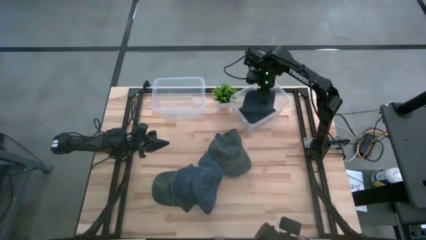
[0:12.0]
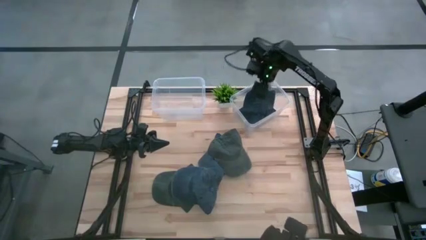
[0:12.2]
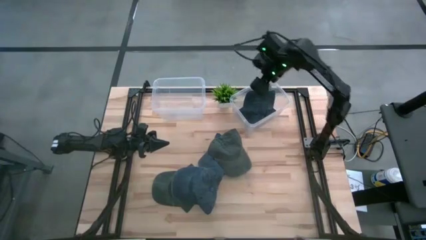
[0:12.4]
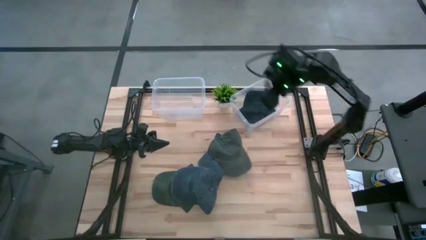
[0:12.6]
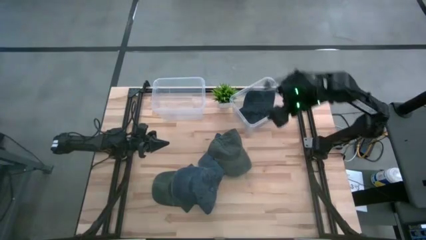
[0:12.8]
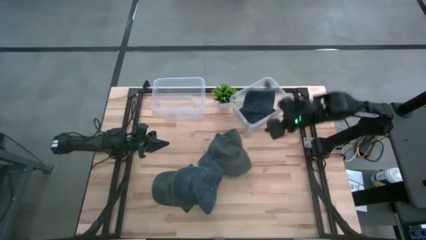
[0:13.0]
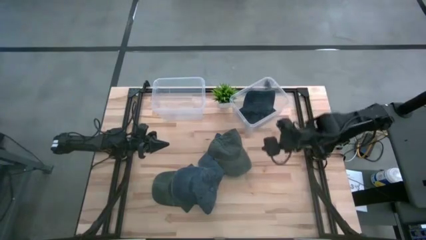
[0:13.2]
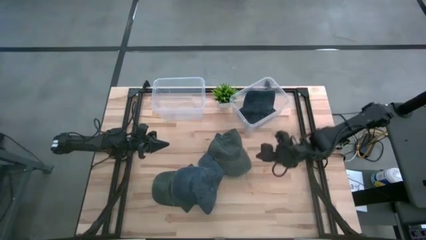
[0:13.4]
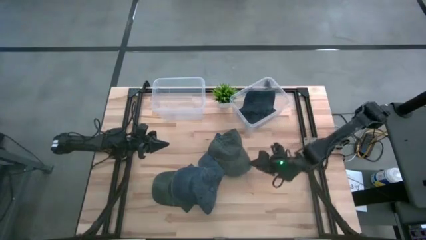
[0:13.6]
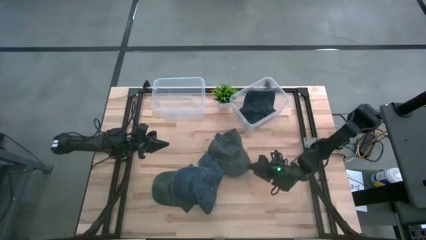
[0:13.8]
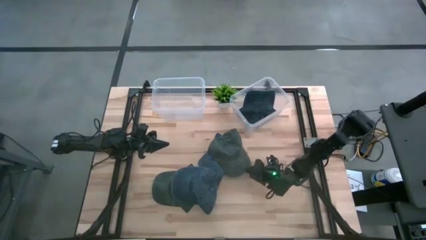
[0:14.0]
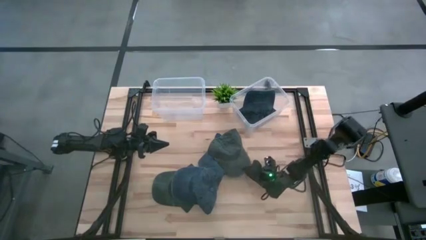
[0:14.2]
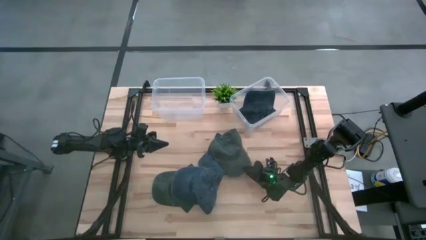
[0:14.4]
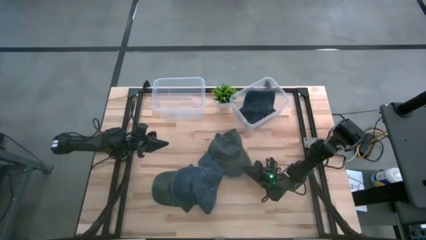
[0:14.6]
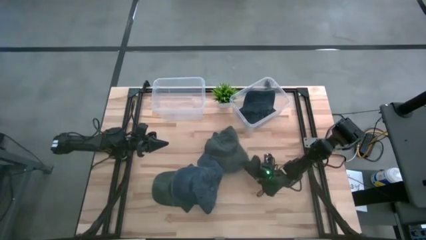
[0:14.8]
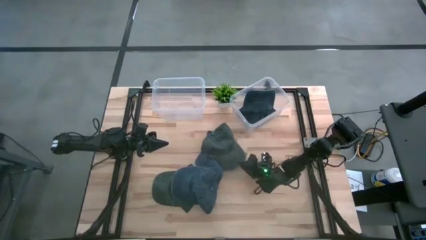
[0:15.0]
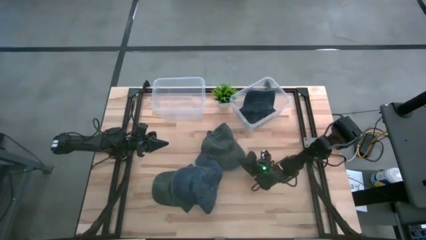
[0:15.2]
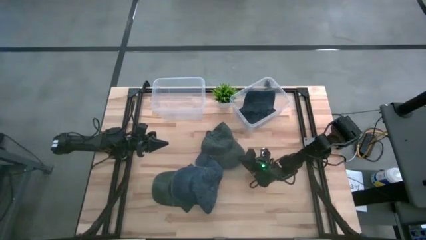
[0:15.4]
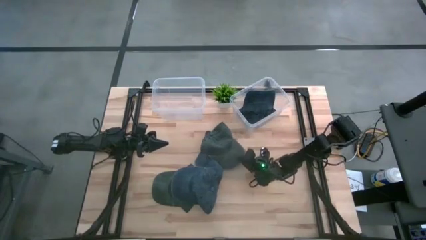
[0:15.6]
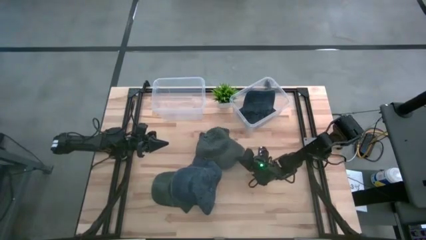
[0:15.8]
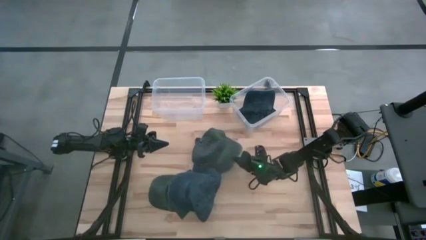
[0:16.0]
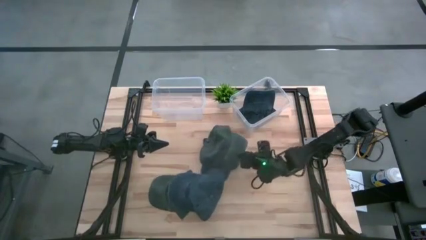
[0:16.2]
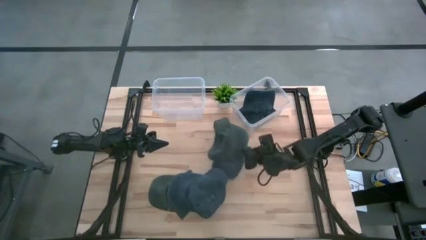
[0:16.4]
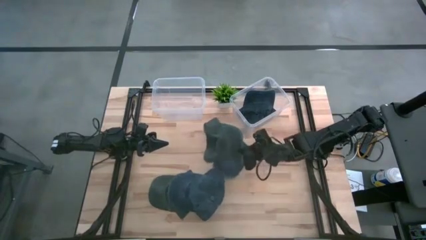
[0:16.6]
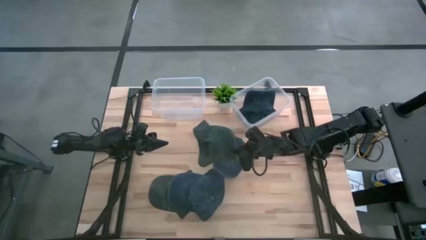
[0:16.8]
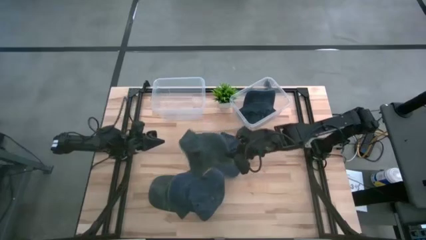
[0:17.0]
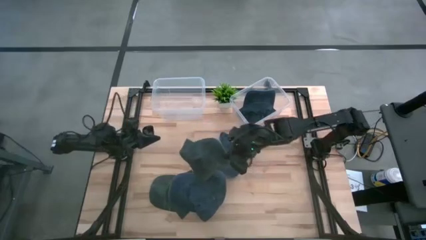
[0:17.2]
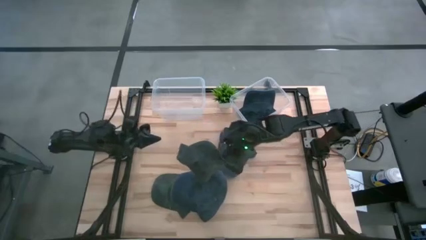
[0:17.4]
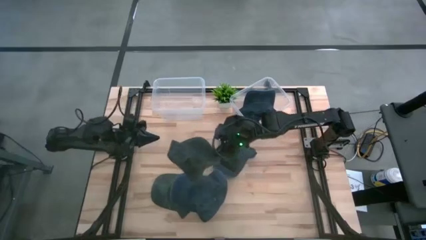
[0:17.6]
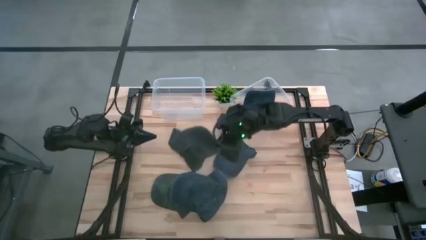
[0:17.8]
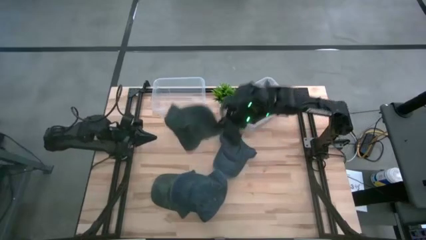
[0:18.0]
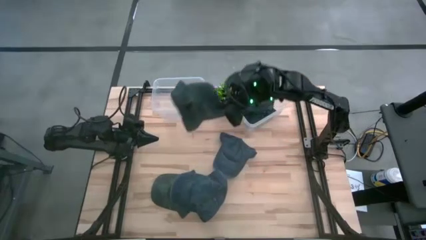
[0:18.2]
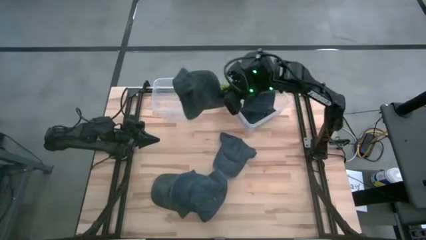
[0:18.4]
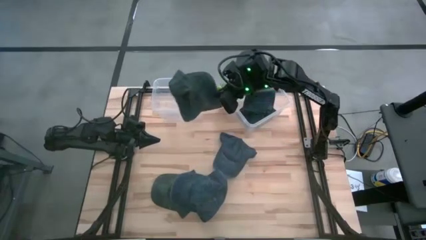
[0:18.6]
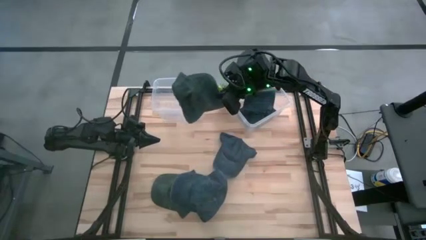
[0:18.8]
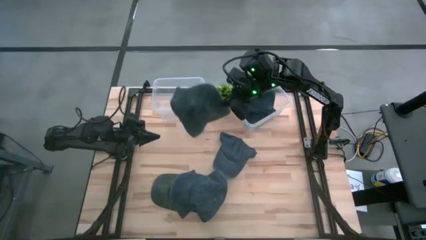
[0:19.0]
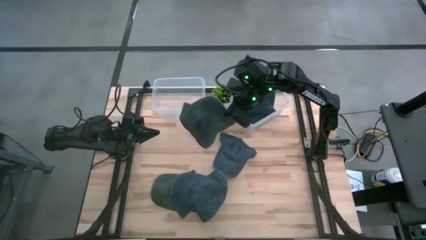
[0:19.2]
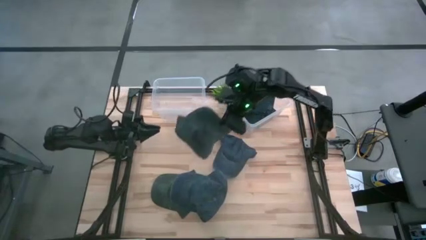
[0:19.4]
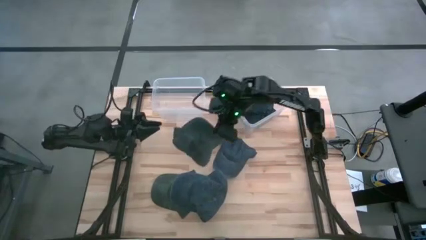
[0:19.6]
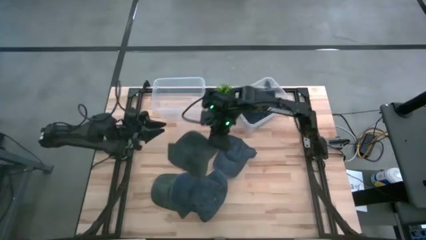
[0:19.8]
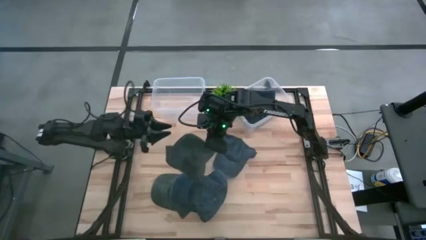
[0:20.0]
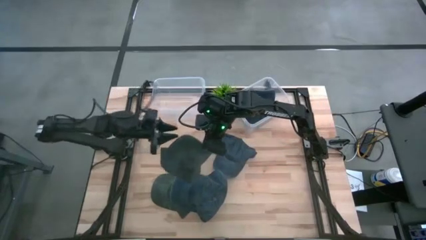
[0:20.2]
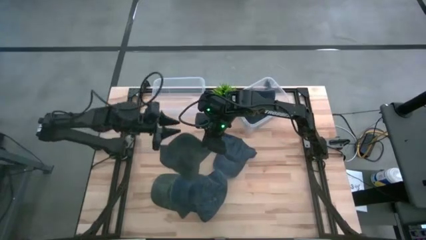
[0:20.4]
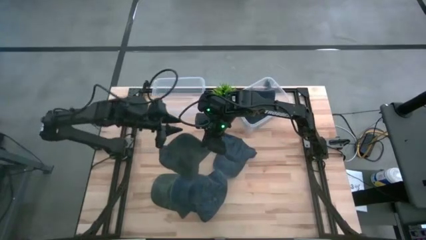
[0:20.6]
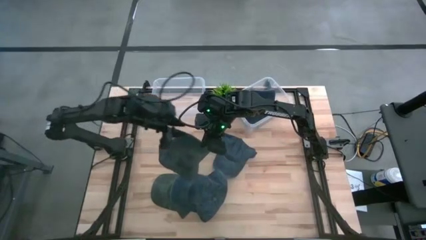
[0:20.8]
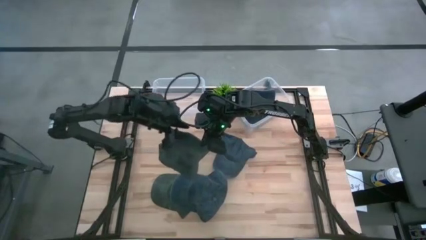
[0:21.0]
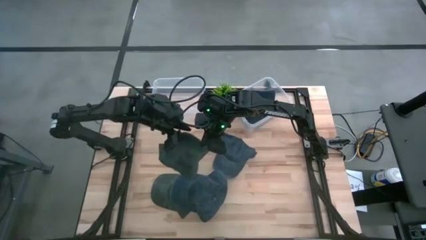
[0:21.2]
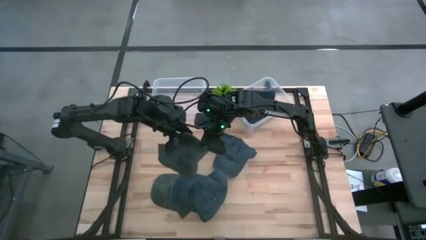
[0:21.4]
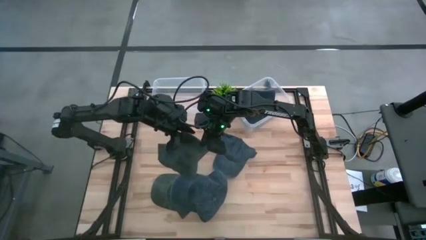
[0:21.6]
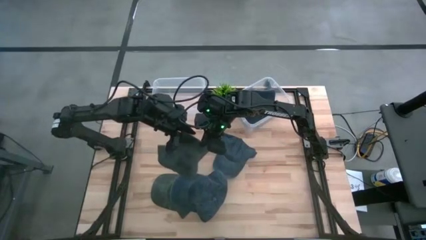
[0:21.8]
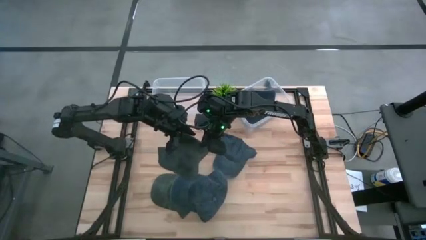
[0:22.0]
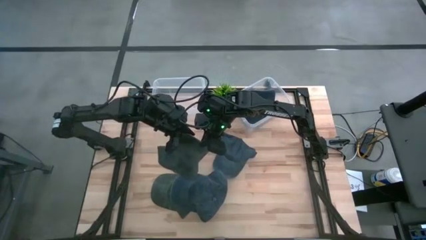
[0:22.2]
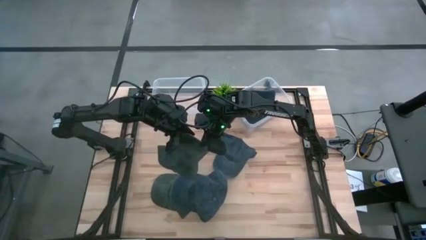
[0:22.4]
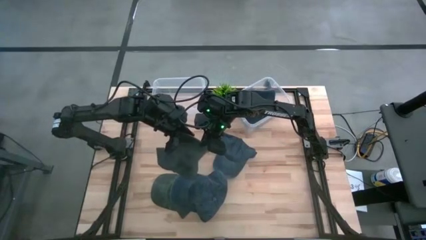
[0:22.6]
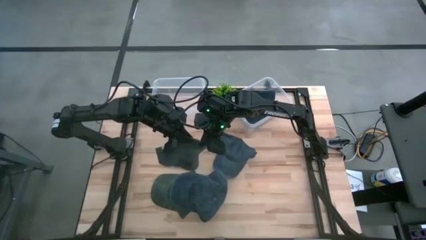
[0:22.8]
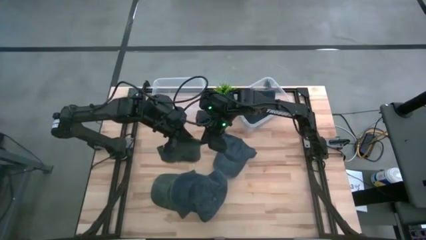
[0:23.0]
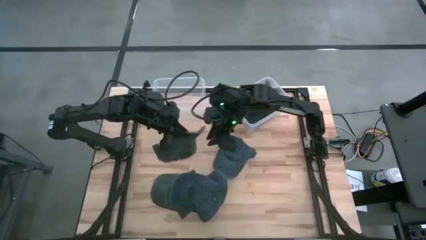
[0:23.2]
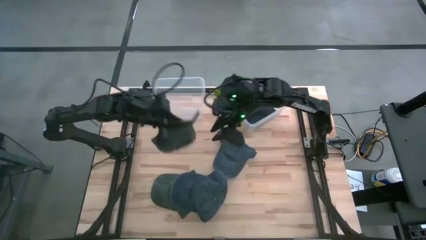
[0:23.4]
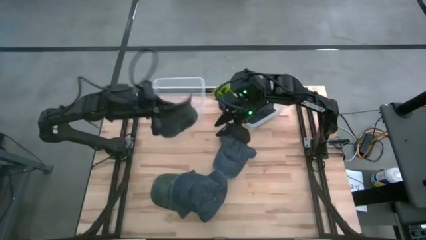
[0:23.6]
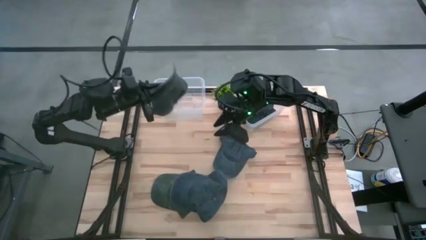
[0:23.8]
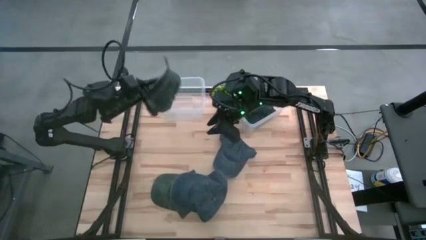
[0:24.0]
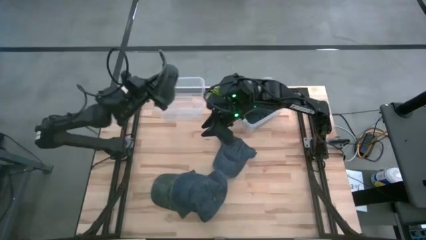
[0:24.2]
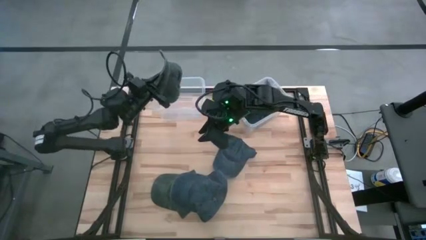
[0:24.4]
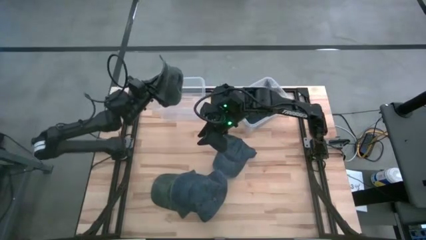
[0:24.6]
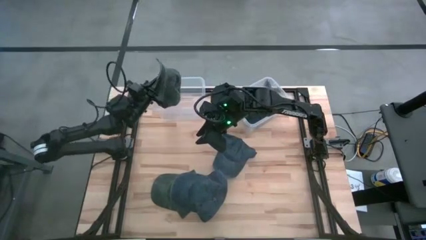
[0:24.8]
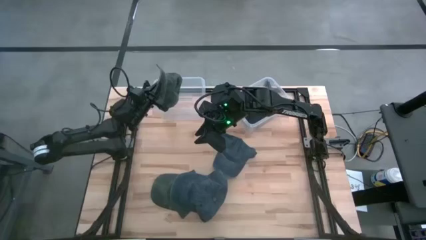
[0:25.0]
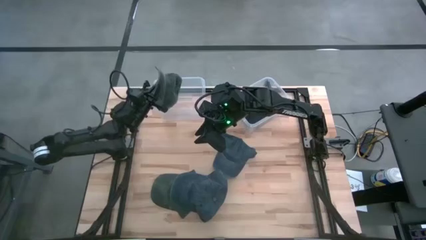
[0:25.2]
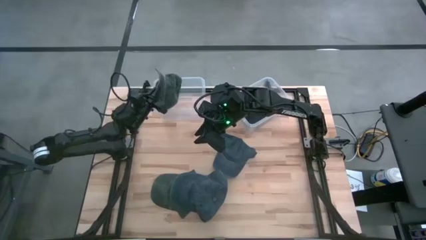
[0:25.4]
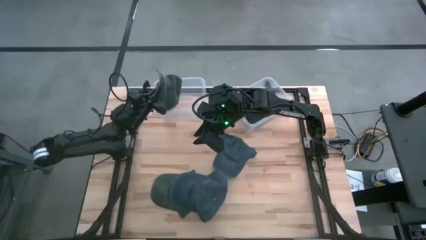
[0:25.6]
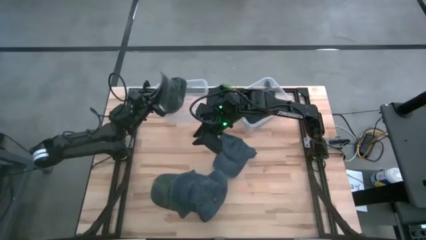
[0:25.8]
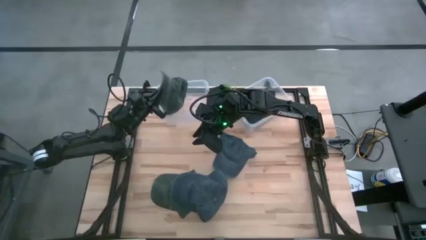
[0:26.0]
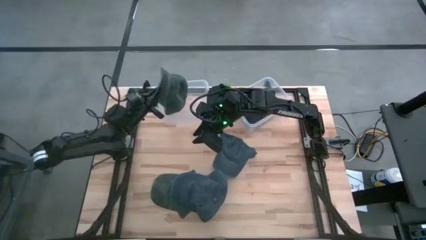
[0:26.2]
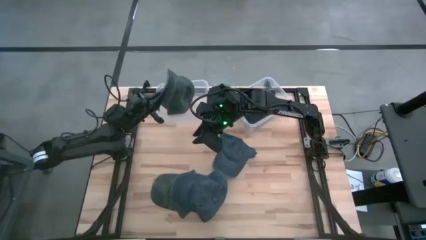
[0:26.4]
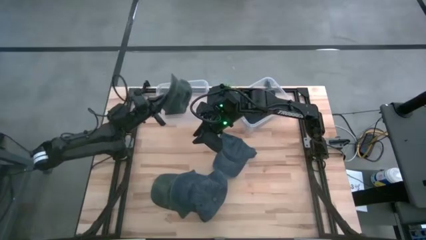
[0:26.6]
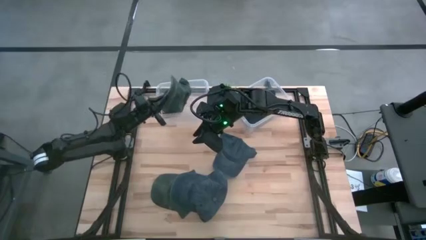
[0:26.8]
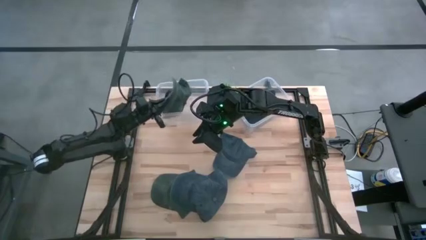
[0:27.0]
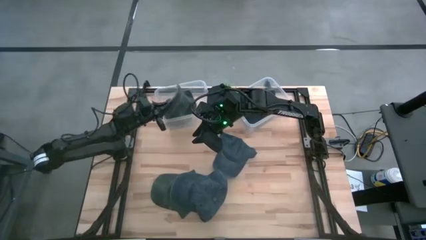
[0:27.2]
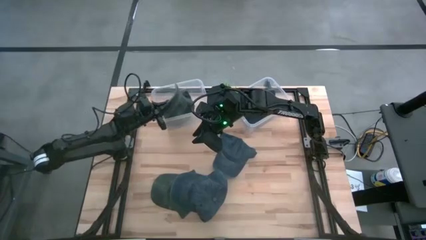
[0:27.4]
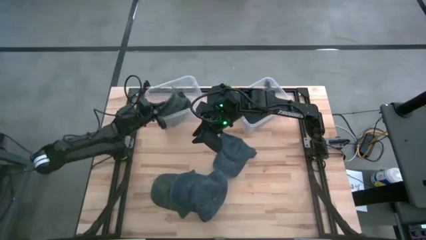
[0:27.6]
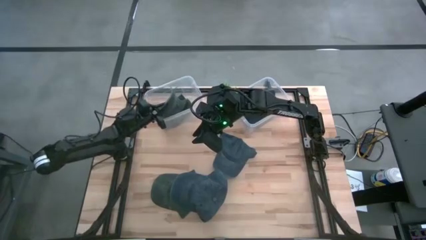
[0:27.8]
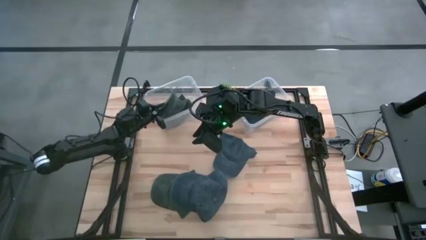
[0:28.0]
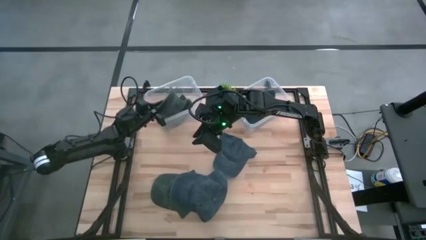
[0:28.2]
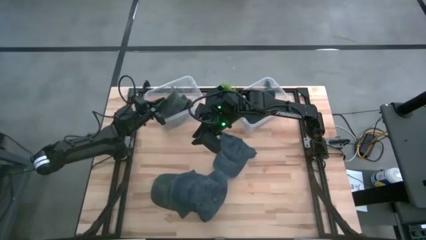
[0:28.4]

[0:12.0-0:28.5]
Task: Pick & Place hat
Put the top black cap into the left transparent bin
